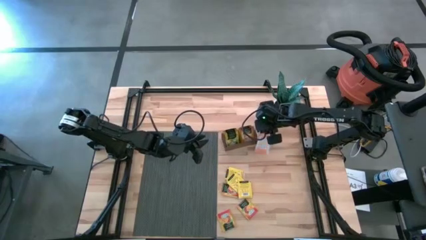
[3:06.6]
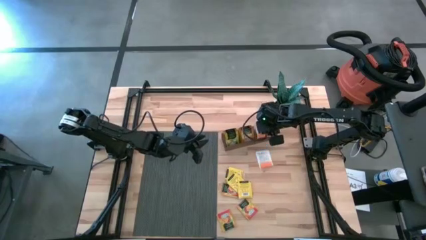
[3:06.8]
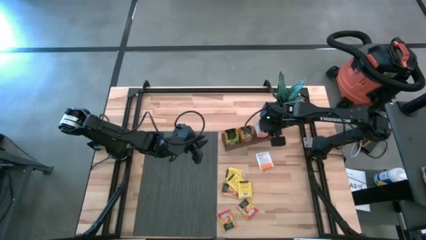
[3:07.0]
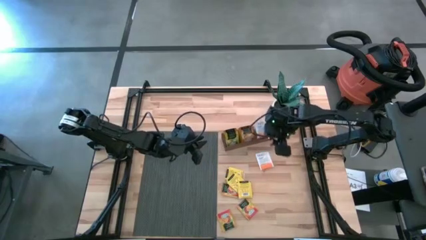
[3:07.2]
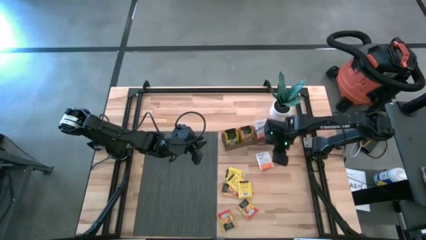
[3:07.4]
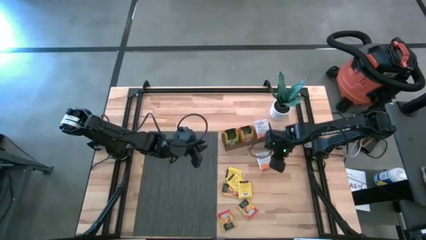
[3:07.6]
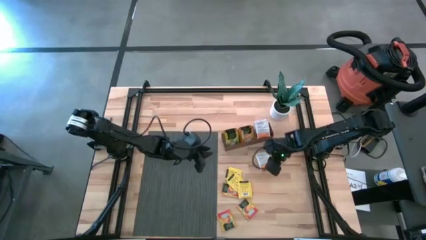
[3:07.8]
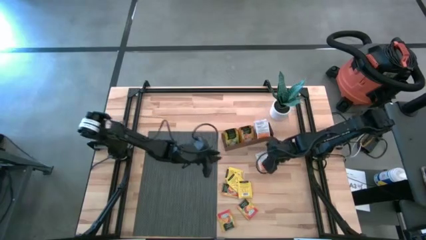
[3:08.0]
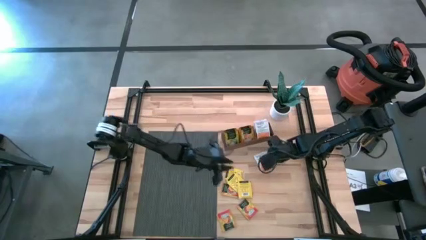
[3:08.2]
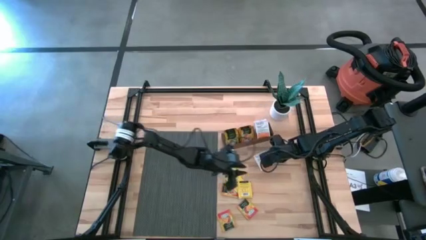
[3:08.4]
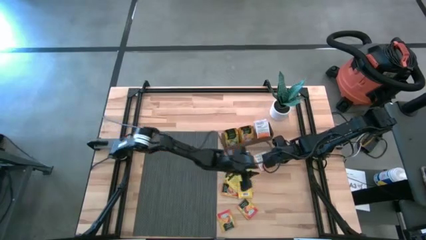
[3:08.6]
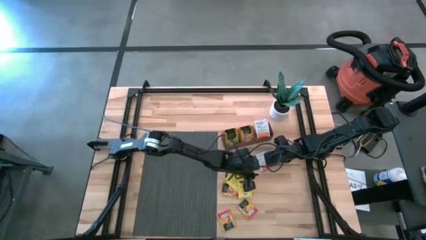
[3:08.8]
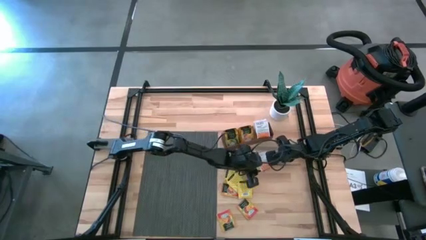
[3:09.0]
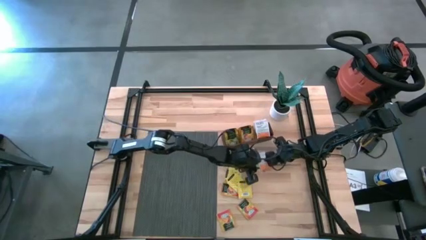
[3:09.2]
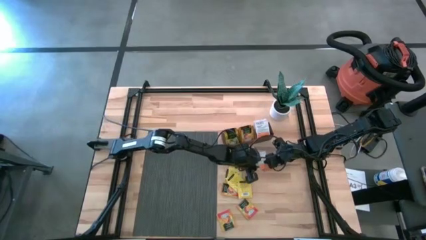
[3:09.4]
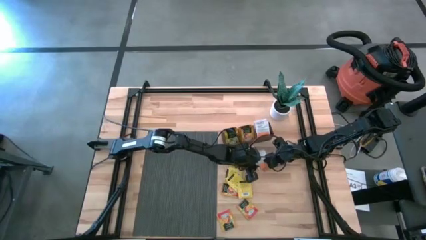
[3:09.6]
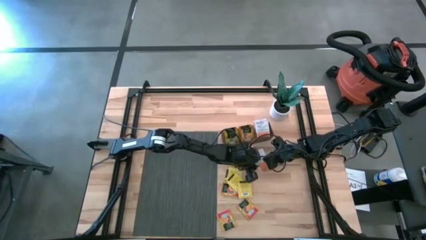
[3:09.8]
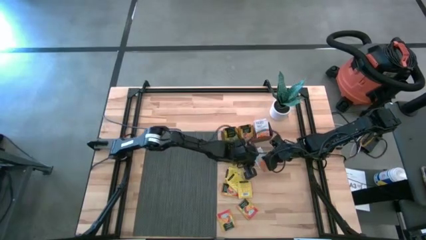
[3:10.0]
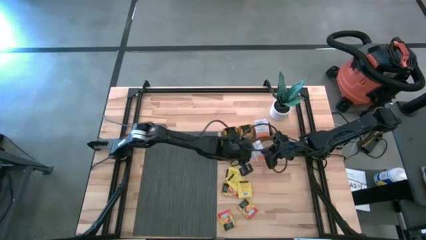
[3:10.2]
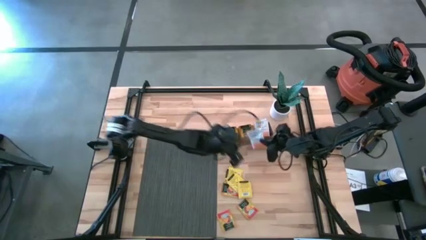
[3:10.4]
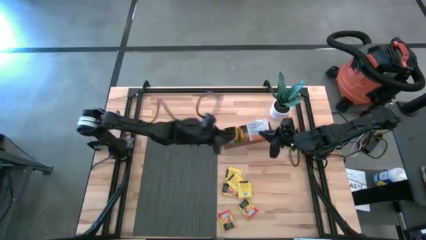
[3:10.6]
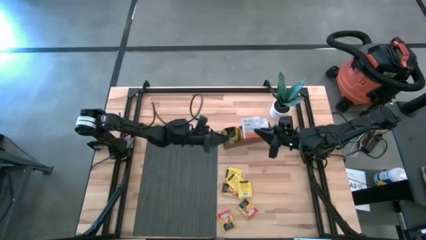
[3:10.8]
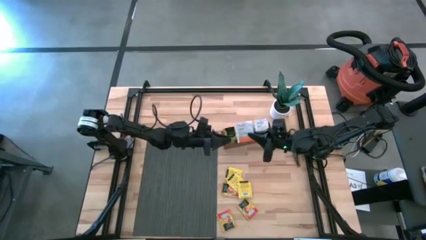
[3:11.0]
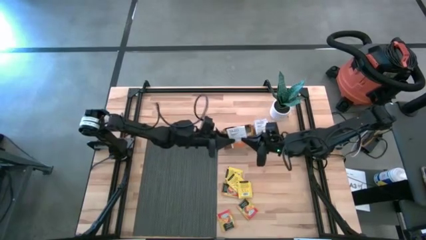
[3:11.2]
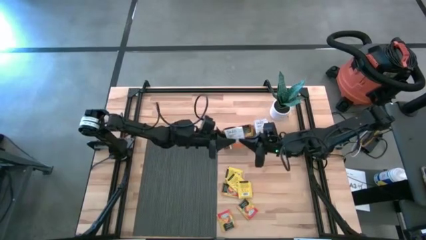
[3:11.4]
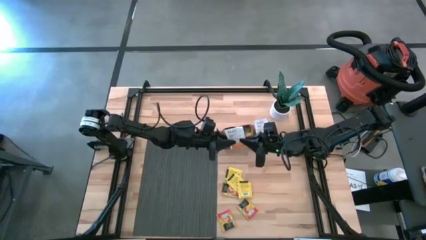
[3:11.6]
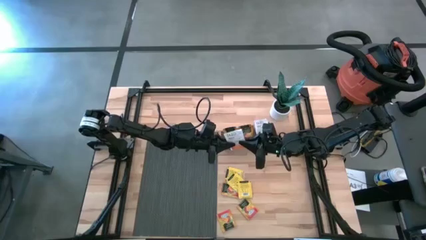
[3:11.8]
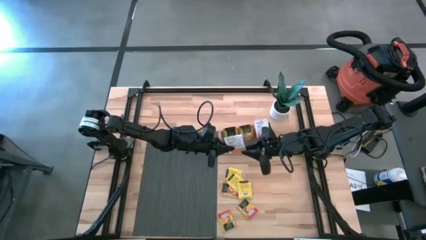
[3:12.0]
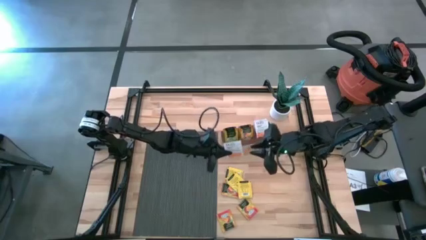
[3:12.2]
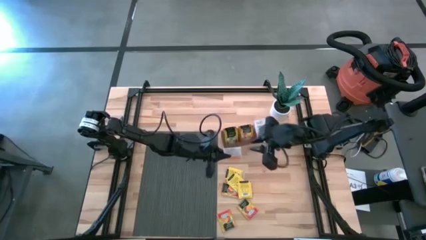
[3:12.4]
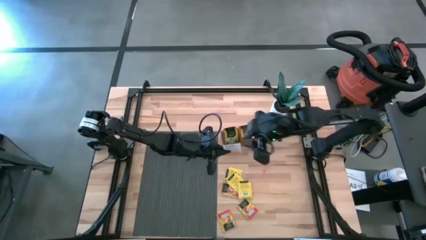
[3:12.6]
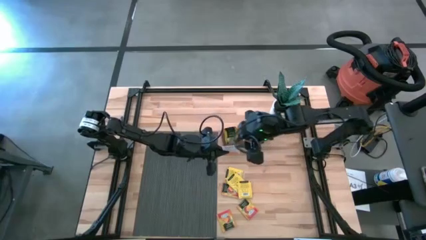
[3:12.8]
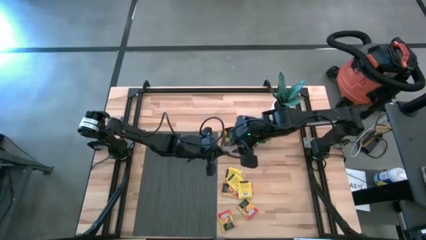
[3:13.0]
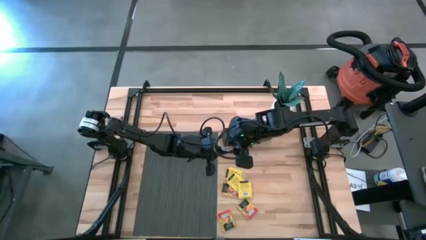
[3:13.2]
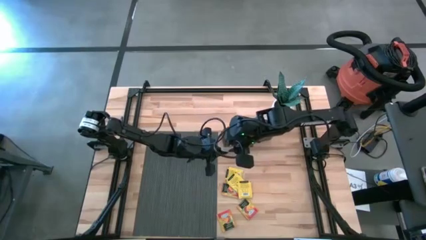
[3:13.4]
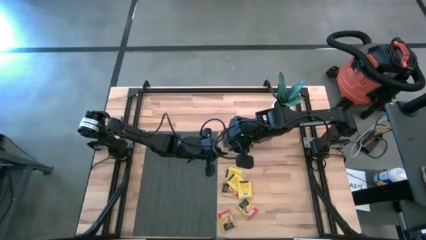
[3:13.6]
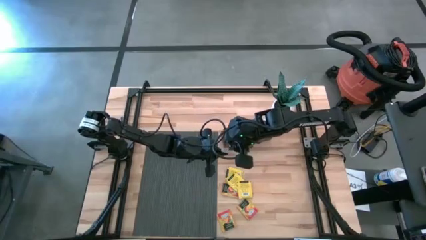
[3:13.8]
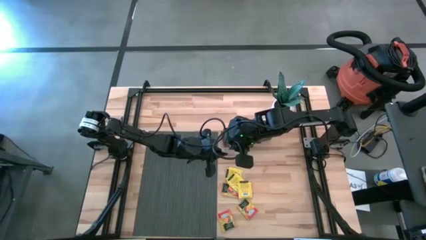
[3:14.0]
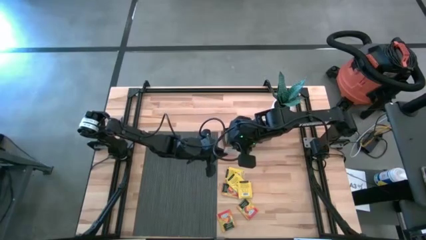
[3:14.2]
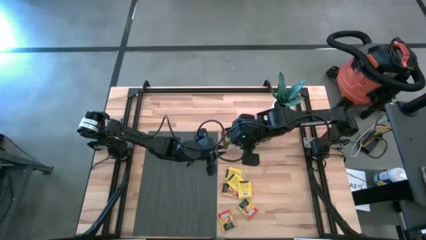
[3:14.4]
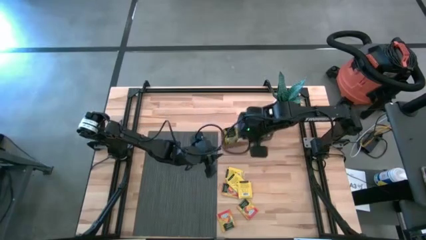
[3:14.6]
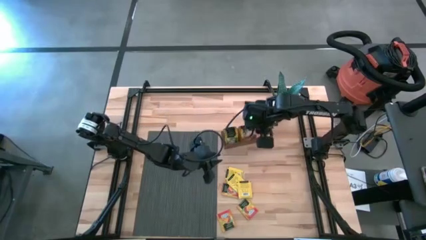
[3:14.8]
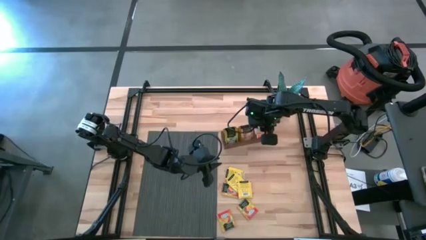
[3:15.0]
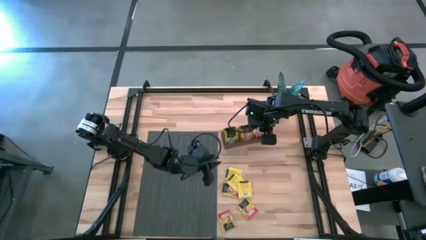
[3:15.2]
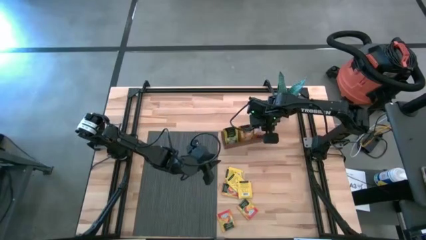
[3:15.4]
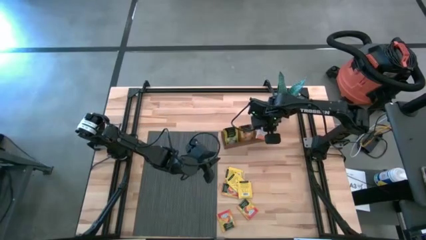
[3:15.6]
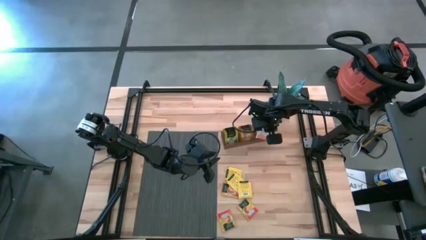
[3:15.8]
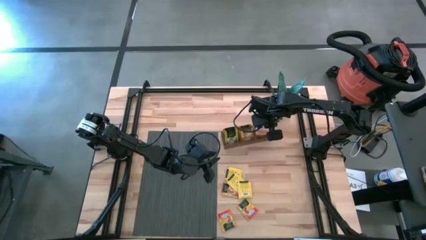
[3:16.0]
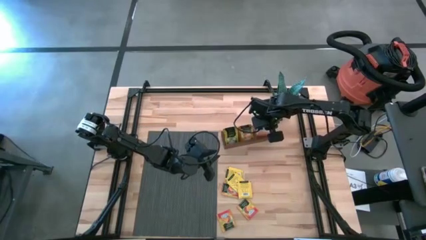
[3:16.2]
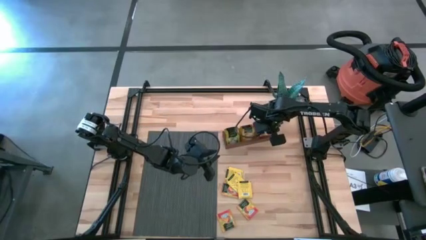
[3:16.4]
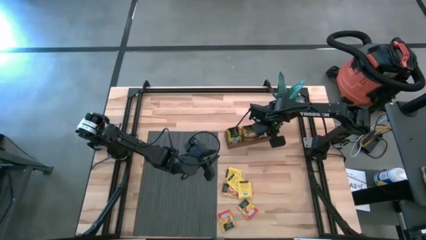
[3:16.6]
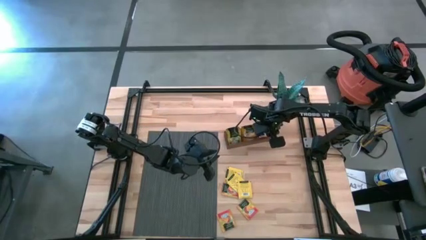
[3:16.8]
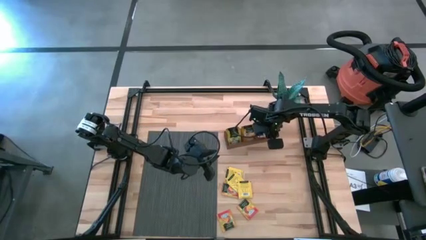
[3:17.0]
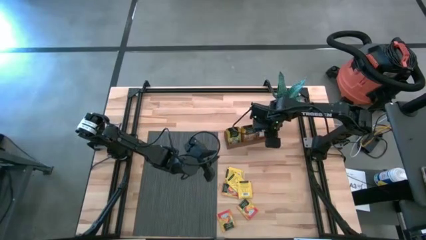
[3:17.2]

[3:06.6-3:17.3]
Task: Pick & Place Tea
Put the white tea bag into the right section of the wooden organizer

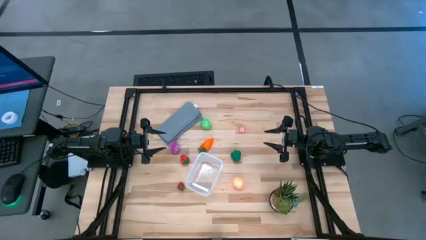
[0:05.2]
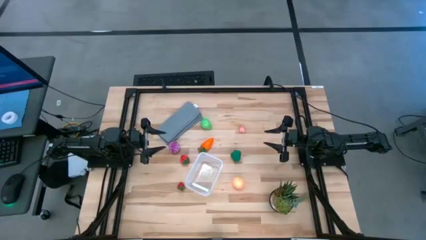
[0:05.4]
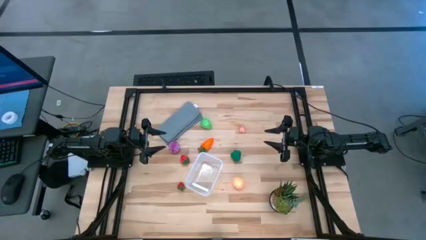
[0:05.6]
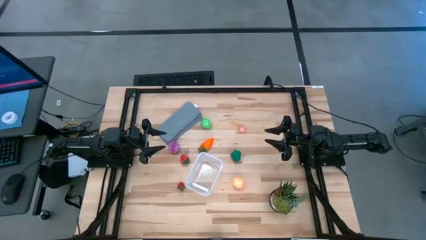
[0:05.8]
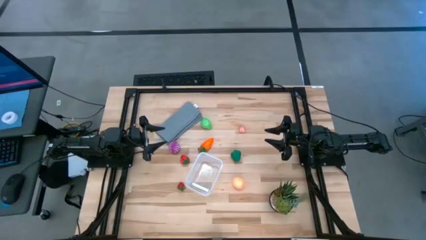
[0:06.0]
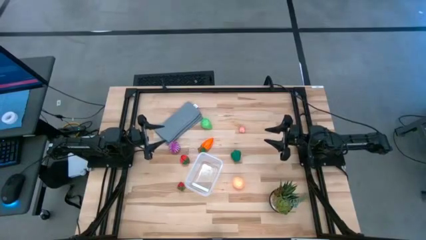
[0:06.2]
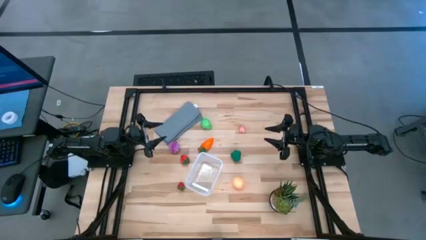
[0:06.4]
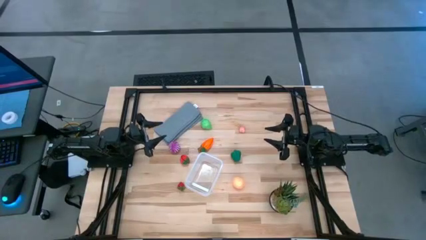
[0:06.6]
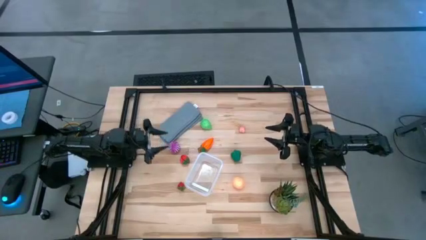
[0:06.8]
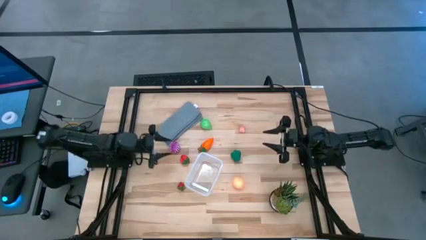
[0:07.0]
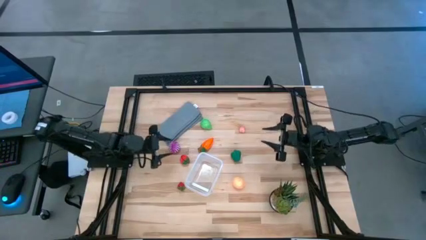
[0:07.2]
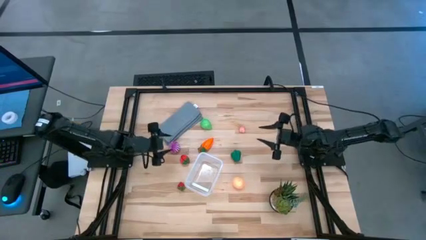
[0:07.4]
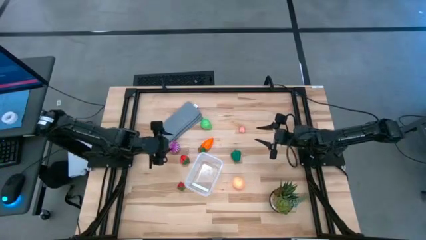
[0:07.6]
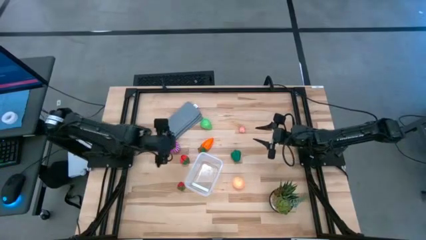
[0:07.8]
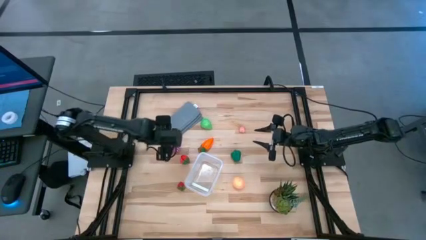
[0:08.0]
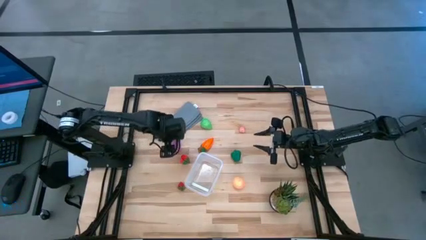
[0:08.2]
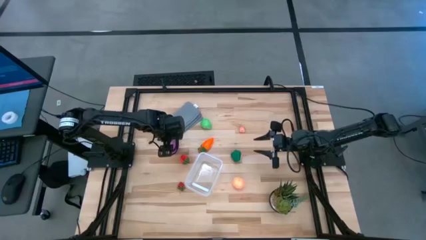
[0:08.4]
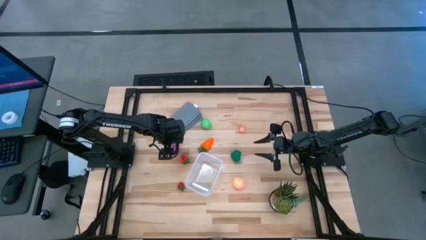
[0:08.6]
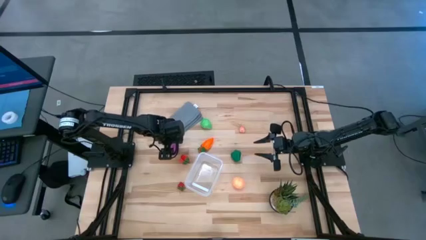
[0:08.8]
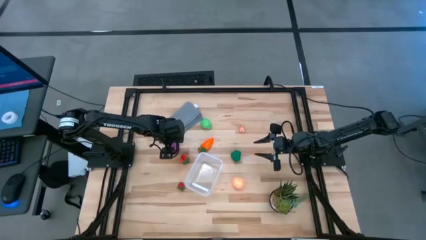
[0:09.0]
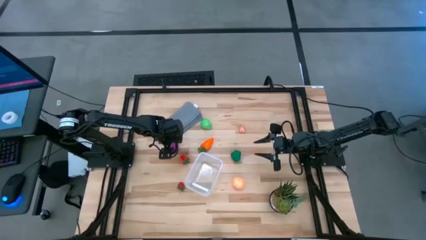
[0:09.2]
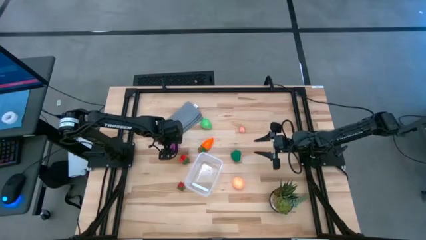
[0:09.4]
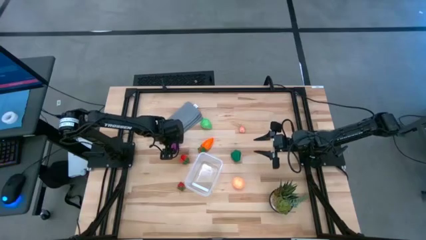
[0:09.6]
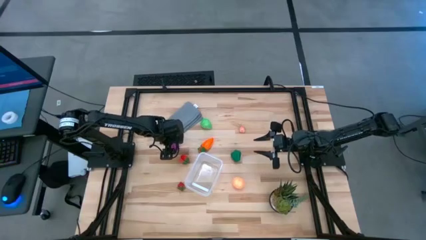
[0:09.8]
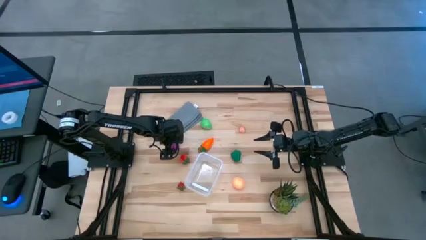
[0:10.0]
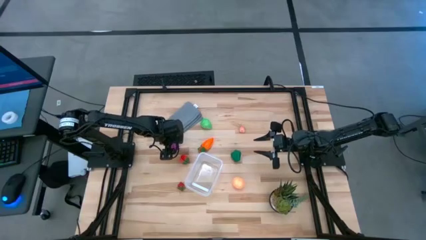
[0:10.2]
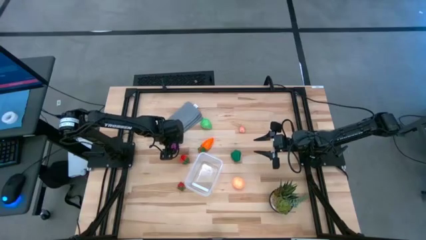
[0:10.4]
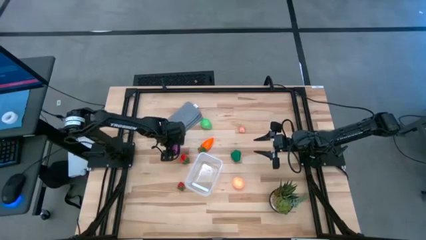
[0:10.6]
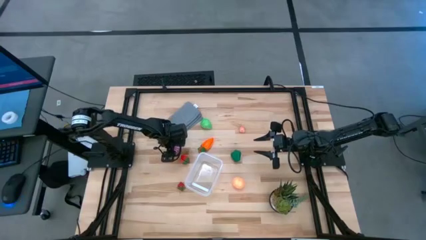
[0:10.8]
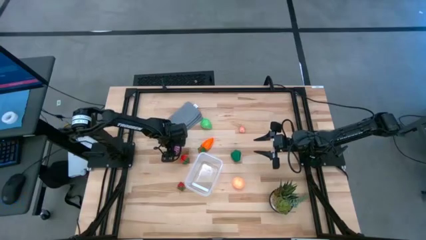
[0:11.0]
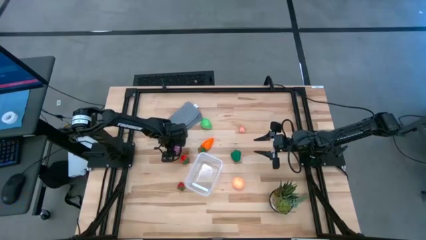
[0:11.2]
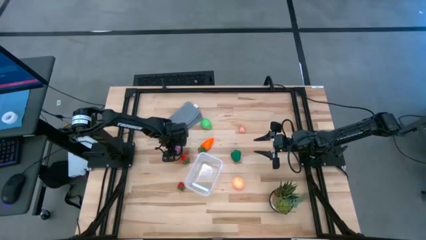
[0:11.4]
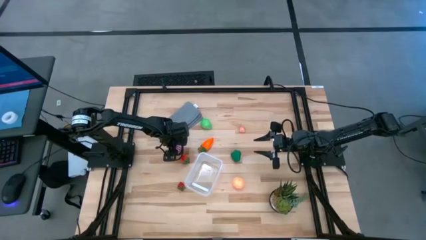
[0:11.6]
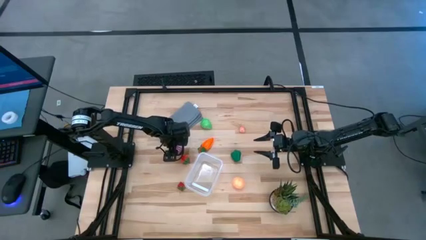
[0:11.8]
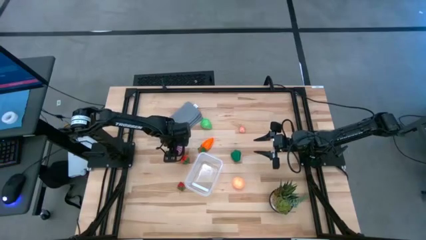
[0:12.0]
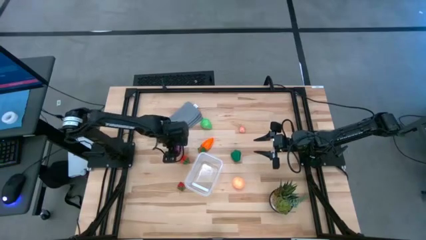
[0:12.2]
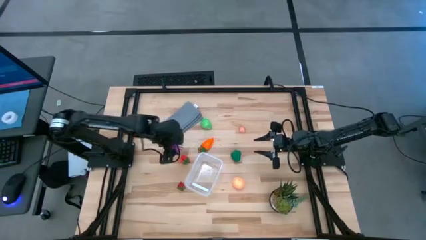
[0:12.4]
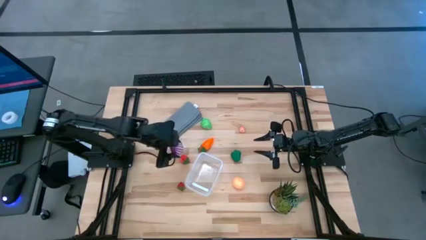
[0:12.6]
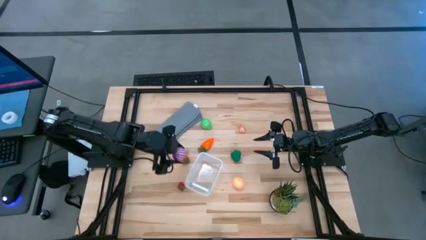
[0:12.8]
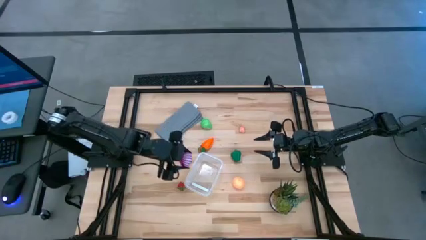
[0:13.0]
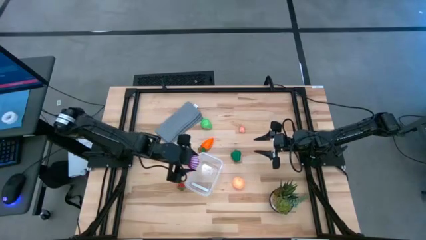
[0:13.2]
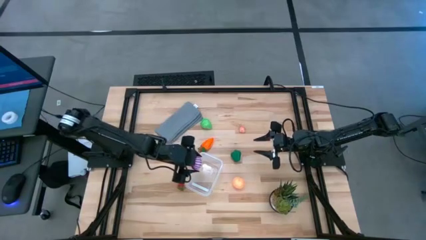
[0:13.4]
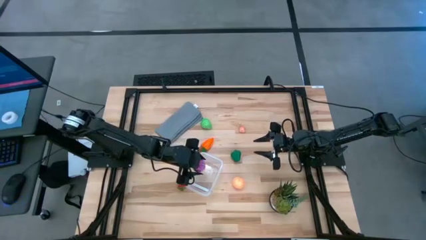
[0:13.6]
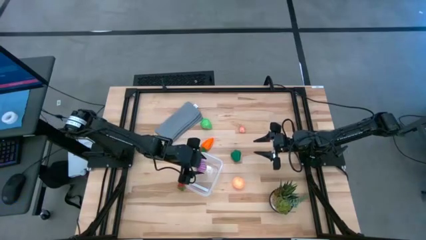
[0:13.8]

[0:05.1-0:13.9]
Task: Pick and placing Produce into tupperware
Put the violet onion into the transparent bin
